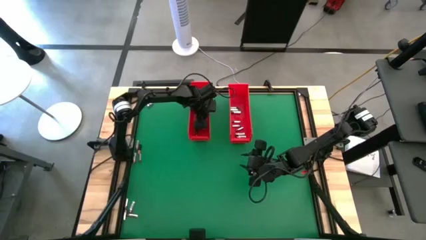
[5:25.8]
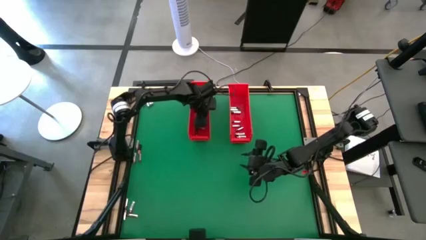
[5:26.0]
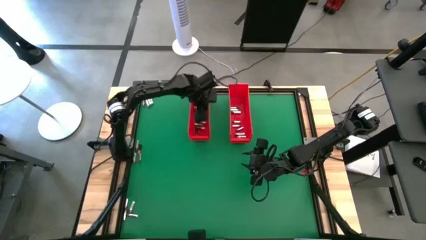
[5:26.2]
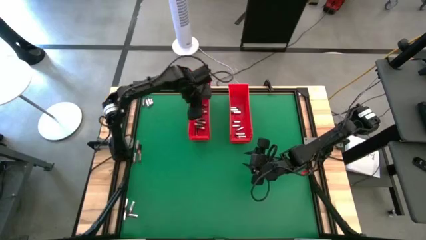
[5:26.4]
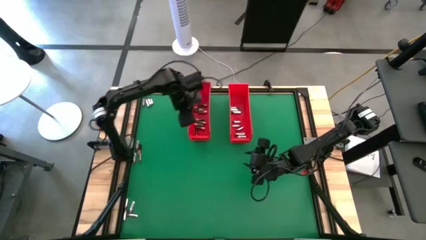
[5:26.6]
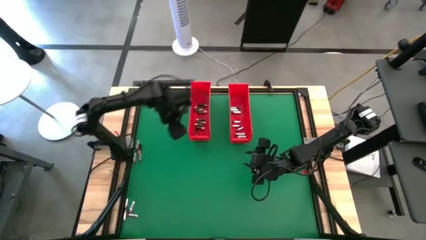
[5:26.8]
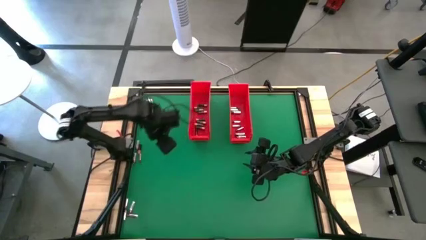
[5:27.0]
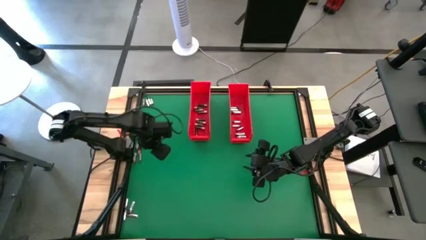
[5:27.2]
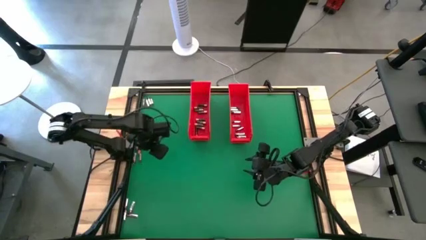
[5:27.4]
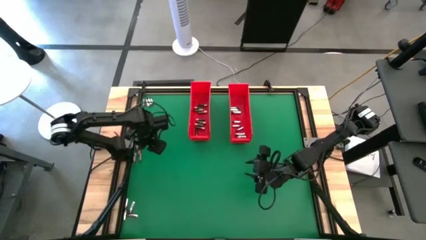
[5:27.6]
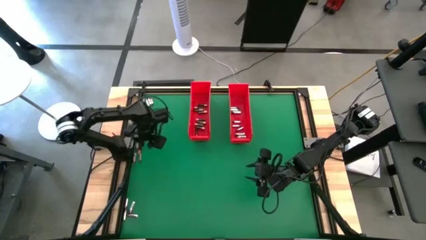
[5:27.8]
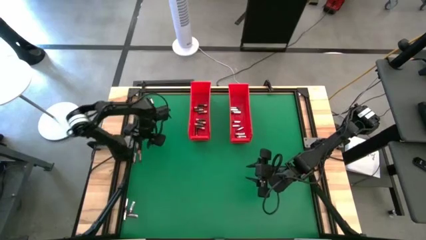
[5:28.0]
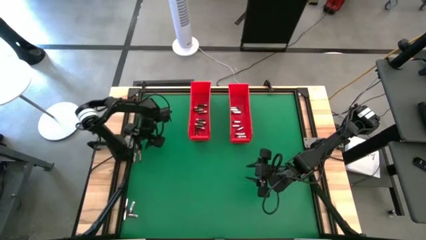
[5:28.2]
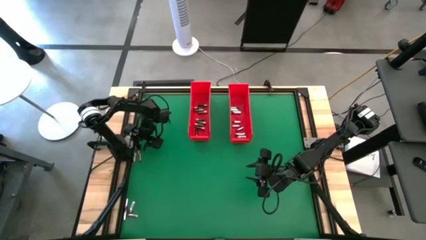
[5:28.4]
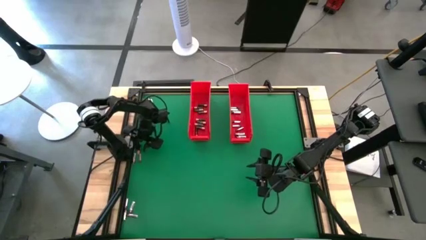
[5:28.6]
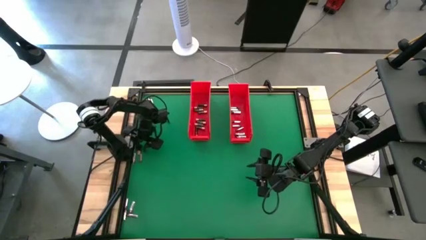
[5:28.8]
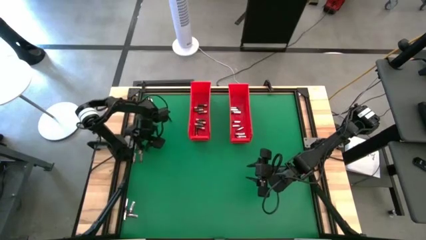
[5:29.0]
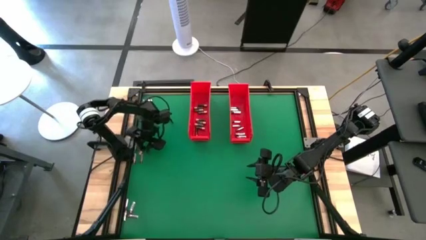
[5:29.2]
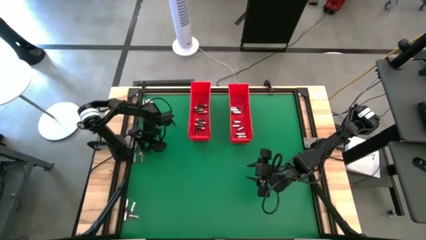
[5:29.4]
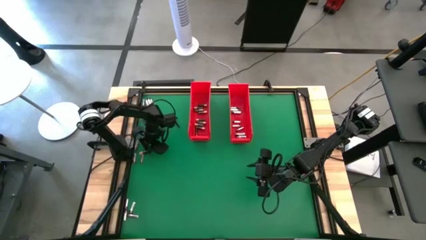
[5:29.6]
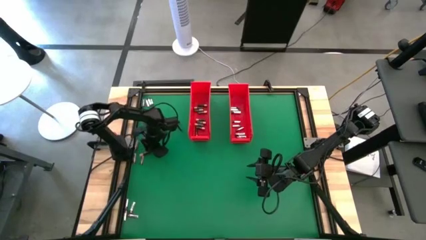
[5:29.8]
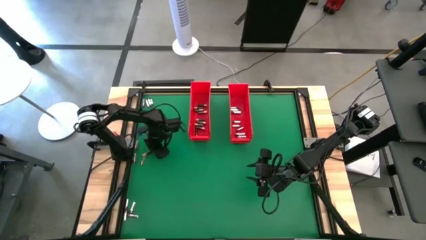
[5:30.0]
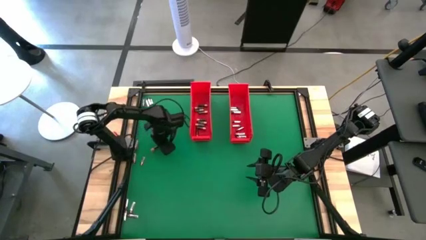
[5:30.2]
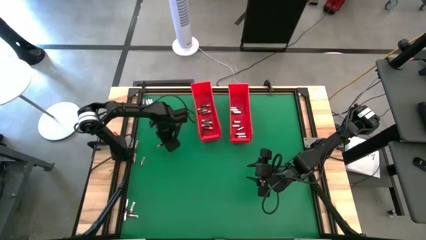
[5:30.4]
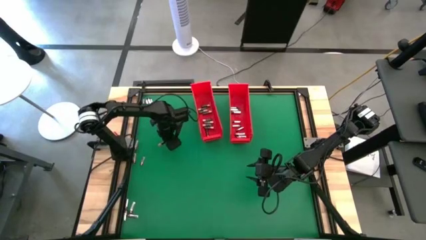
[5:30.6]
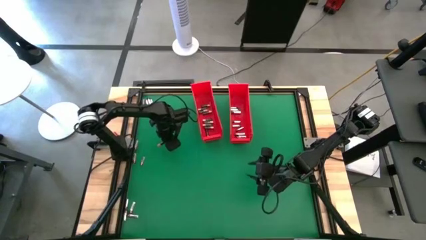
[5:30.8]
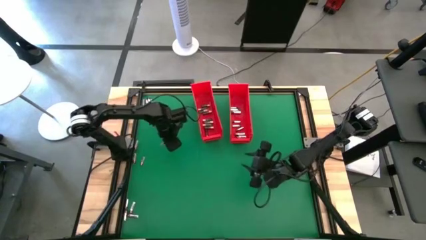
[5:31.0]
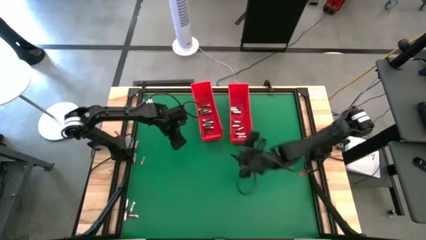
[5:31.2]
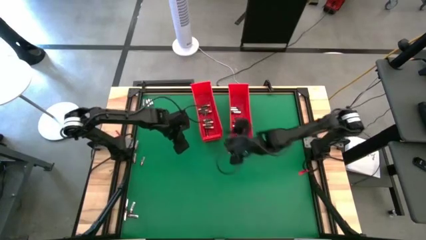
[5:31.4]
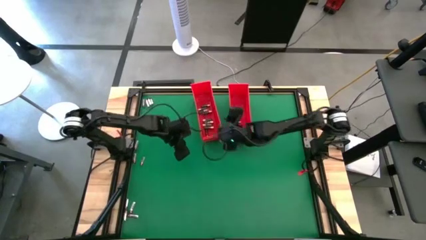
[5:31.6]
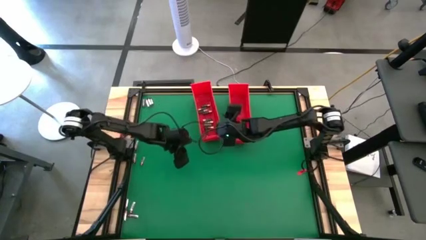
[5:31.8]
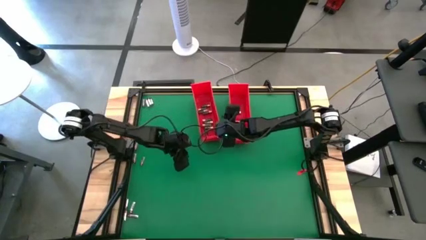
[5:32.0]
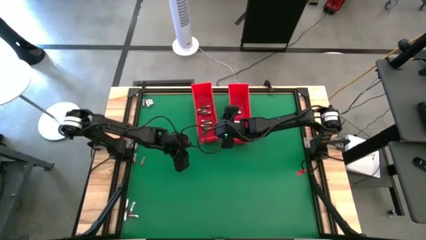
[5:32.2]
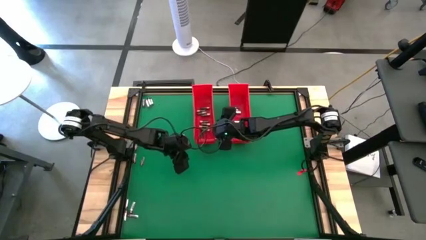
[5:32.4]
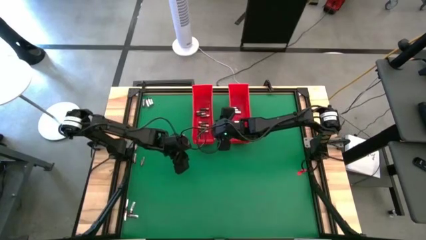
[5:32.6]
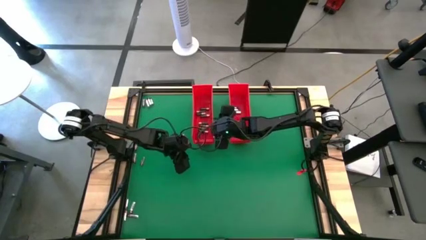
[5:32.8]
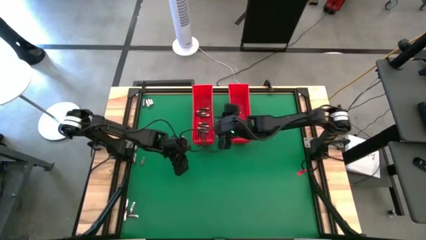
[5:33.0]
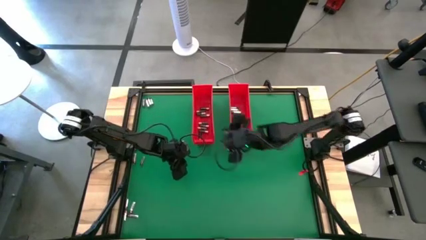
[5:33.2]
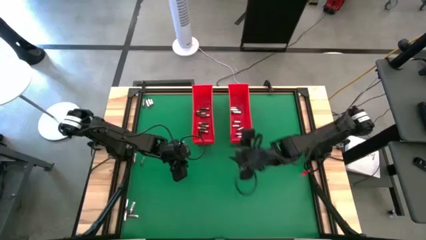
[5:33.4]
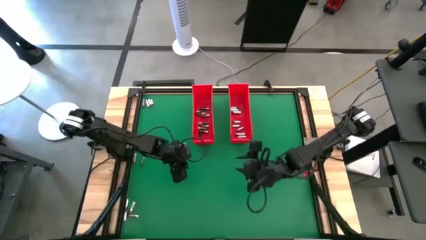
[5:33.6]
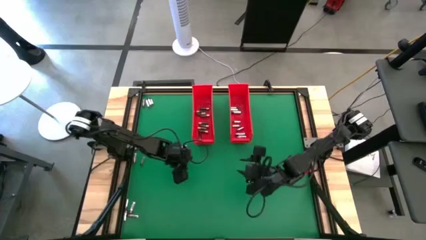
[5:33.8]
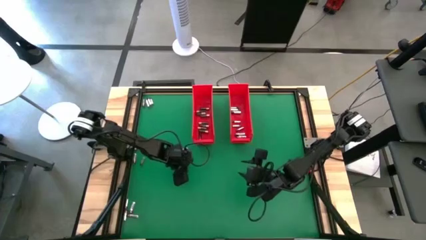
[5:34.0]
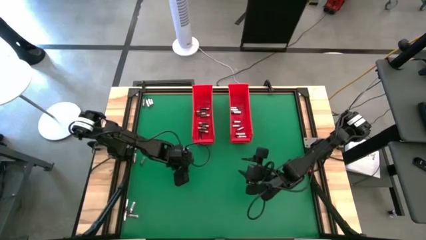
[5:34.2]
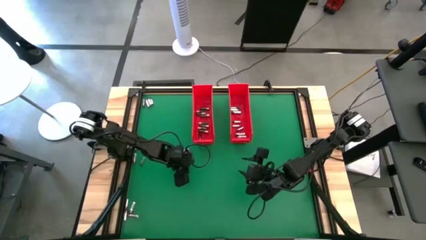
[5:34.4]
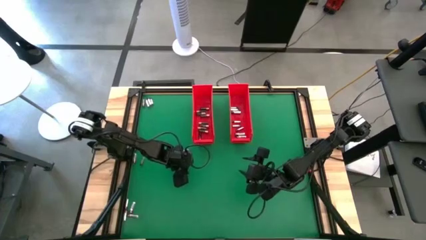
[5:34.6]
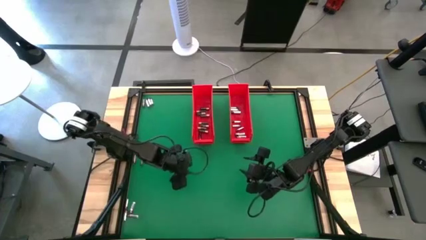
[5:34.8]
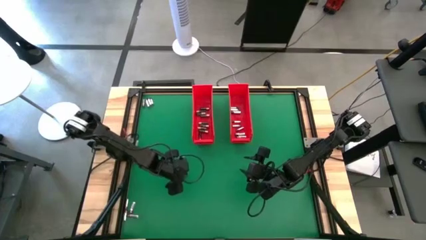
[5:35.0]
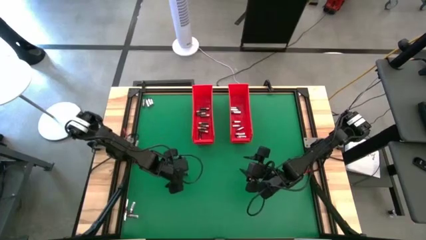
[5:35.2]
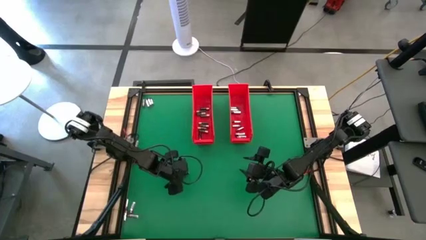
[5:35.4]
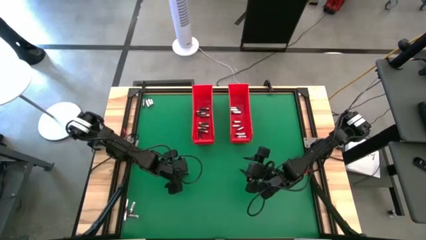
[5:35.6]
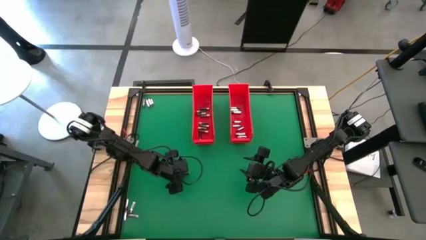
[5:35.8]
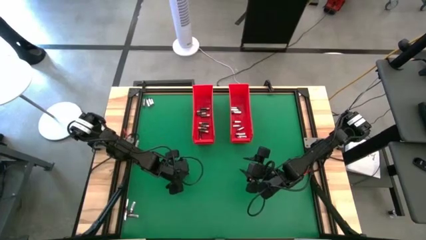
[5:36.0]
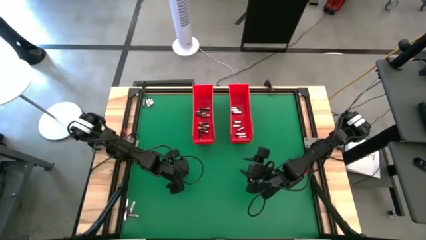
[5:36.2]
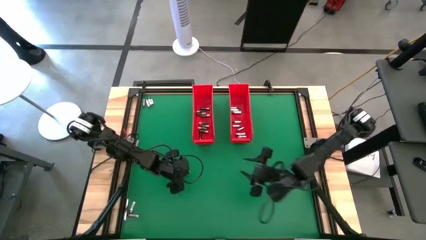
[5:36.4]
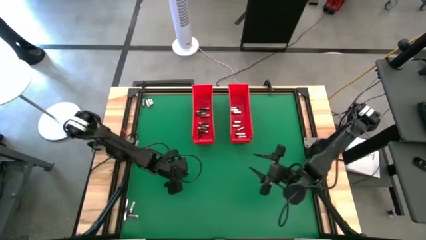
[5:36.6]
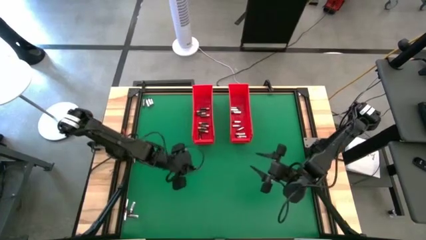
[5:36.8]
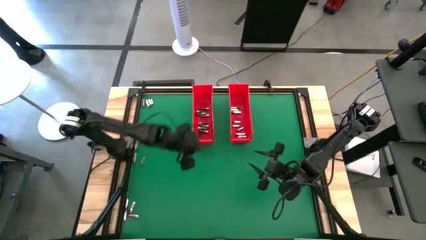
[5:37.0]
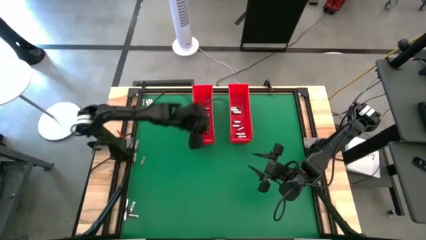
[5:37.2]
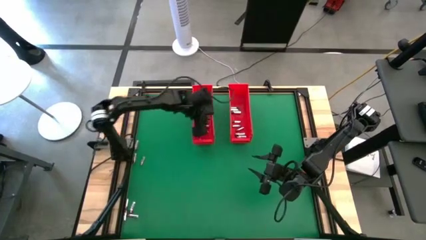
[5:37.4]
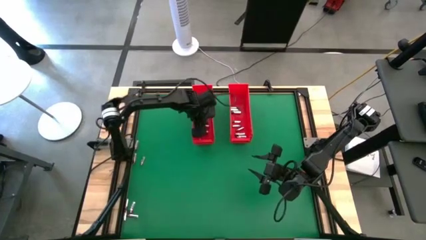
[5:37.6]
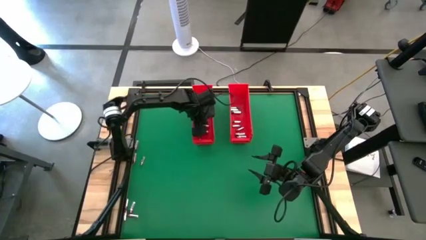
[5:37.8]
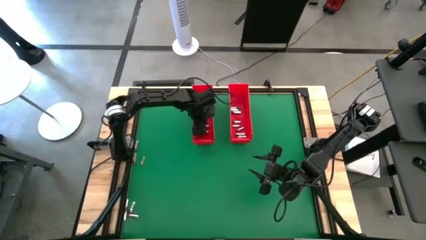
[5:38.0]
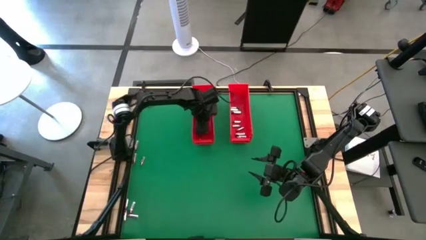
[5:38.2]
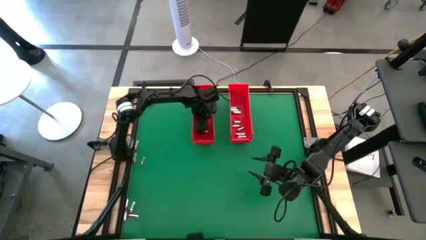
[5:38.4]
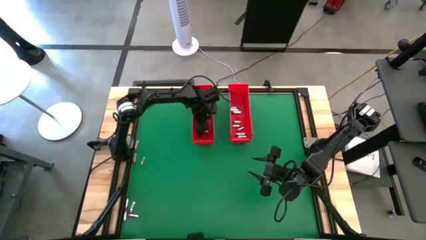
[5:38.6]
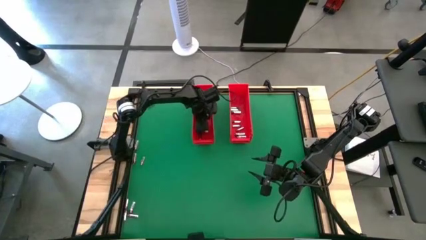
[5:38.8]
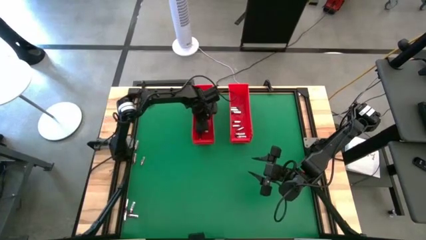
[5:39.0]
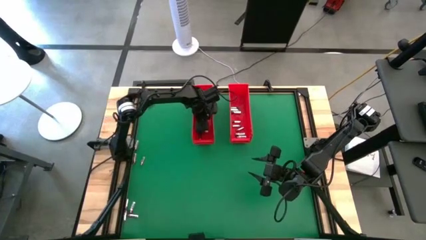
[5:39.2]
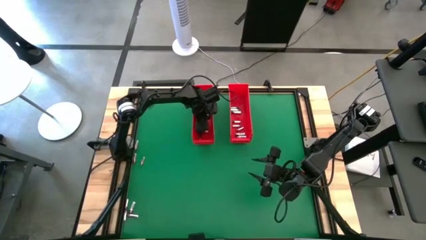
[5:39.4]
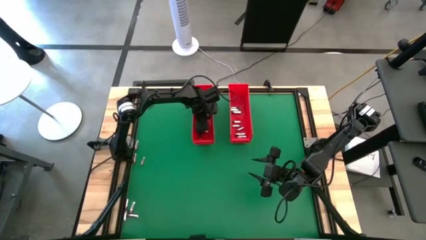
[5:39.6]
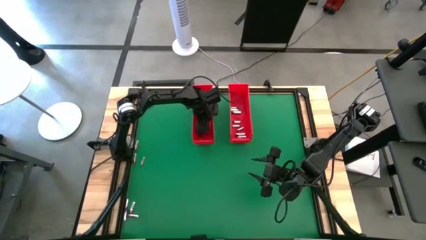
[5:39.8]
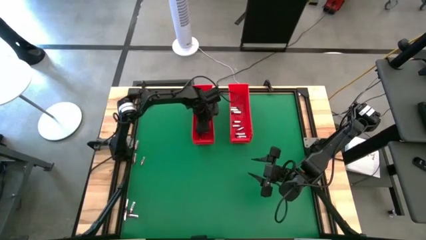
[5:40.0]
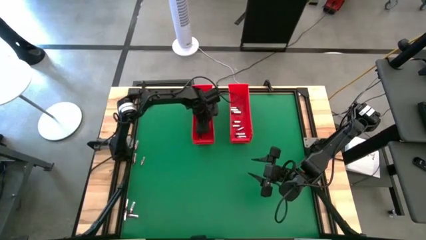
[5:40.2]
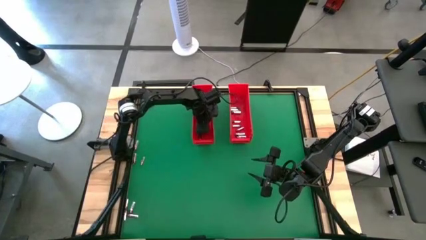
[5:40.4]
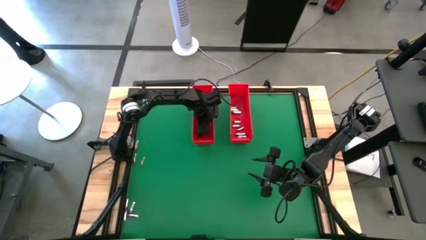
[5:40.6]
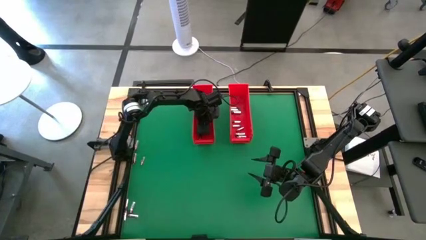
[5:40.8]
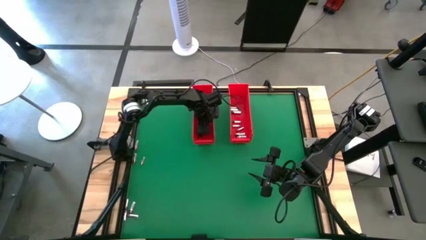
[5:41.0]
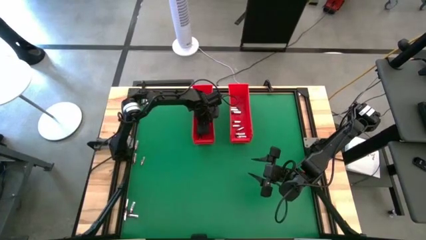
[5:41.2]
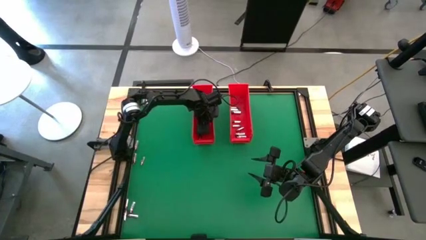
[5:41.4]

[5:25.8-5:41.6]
Task: Sort batteries
Put the brown battery into the left red bin

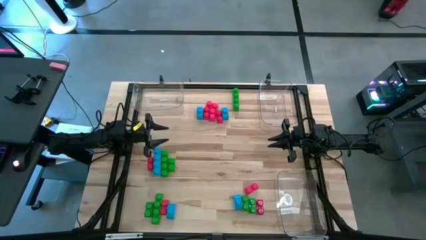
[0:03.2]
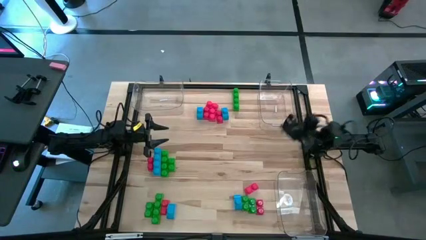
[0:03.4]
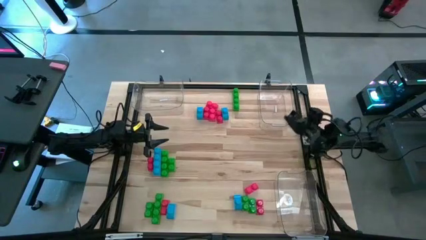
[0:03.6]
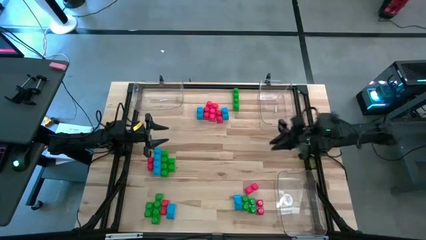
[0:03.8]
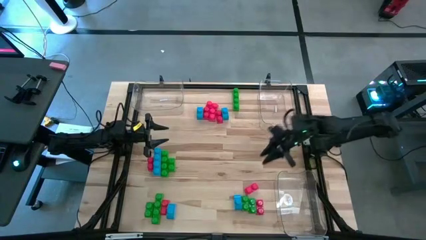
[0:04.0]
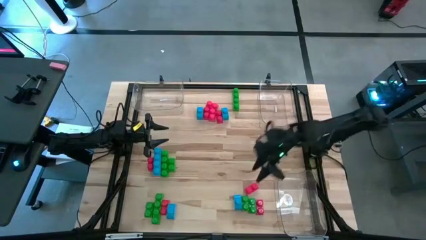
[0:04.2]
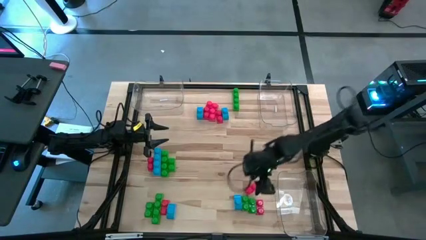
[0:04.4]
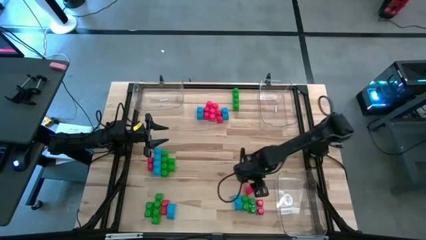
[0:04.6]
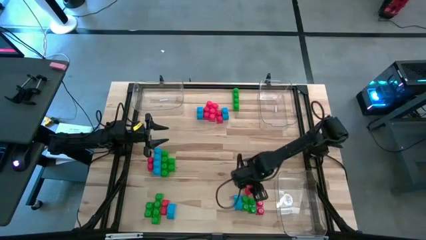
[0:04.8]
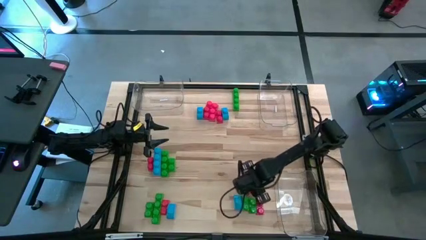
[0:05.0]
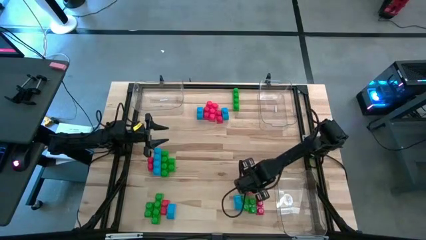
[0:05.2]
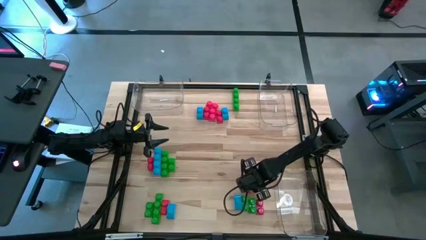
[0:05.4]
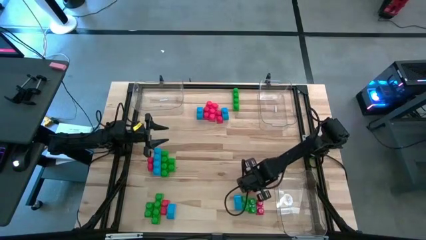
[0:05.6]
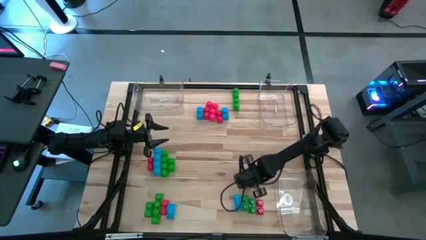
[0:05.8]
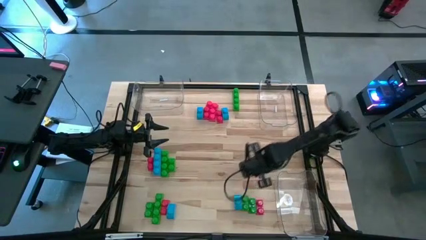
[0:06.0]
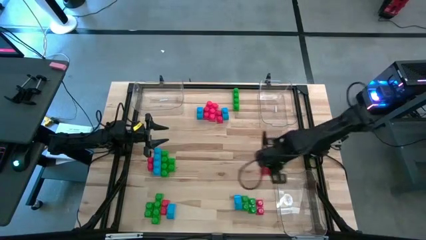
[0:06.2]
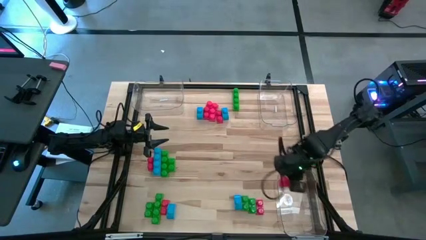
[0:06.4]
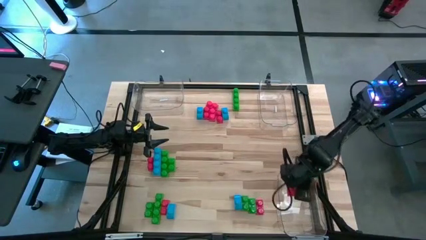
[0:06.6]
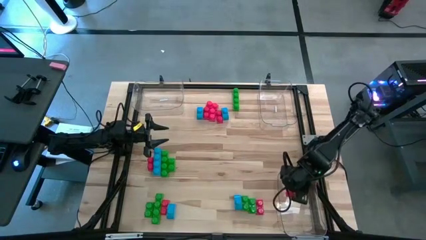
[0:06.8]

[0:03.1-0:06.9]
Task: Sort blocks
Put the red game piece into the bottom right transparent bin
